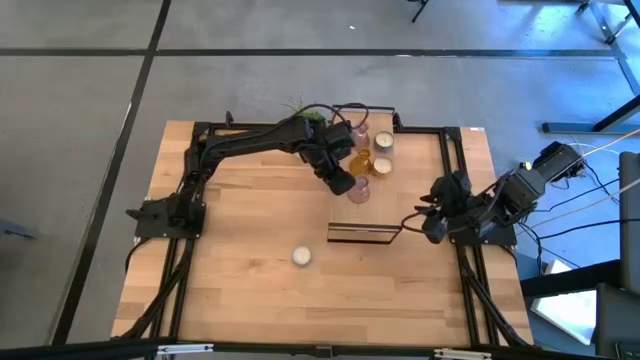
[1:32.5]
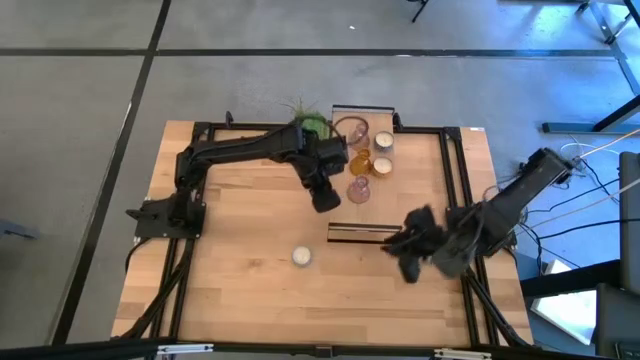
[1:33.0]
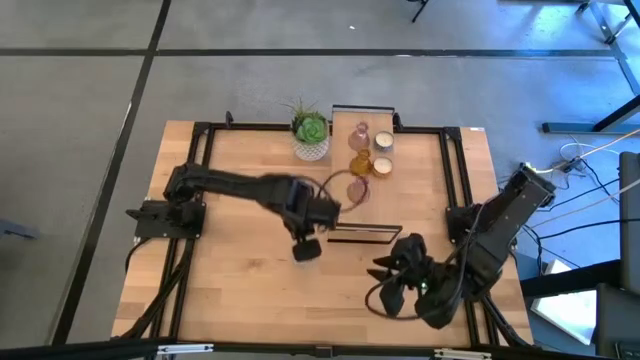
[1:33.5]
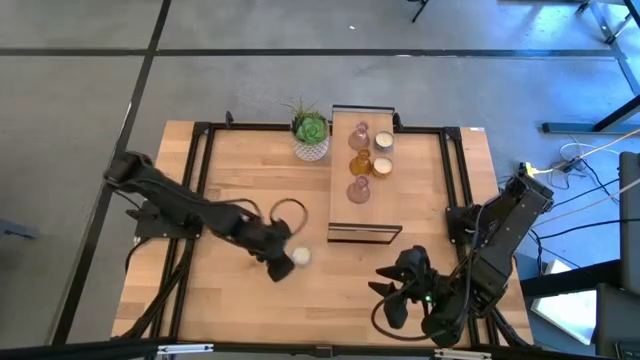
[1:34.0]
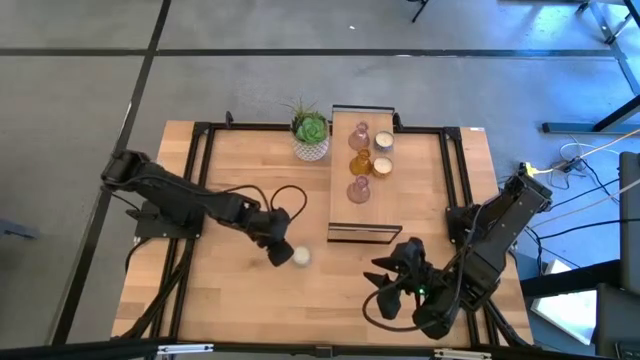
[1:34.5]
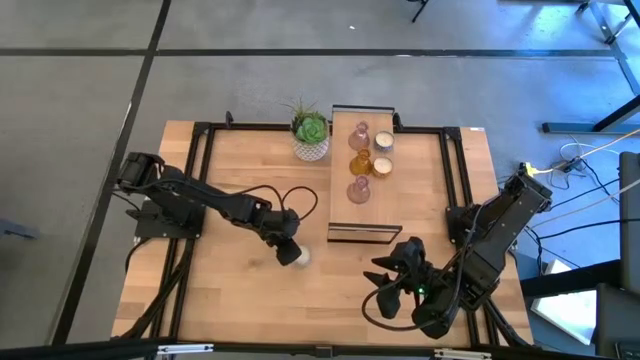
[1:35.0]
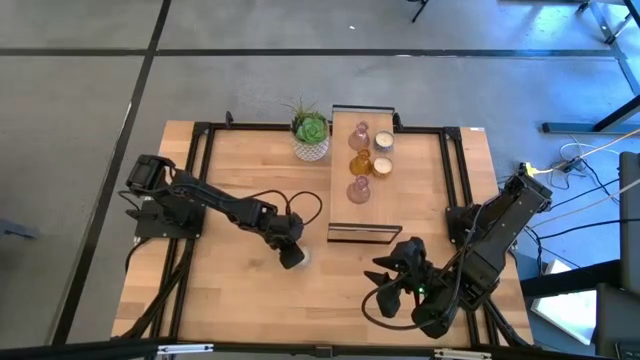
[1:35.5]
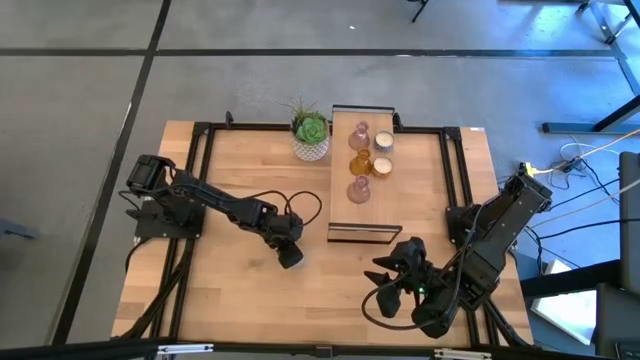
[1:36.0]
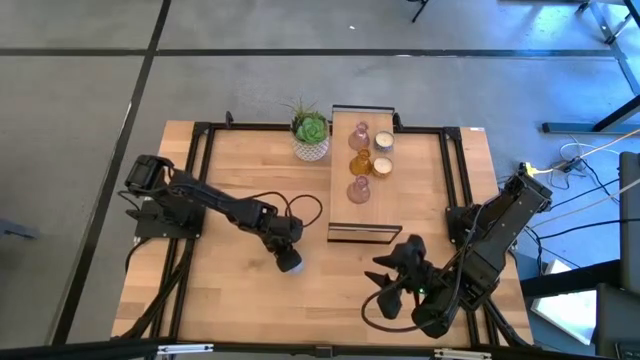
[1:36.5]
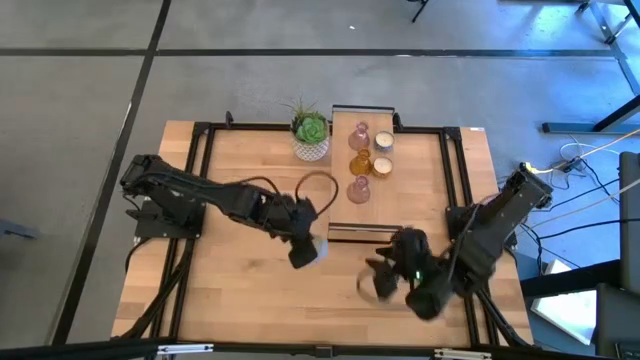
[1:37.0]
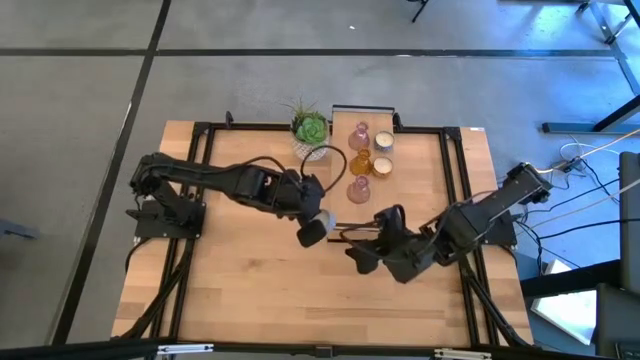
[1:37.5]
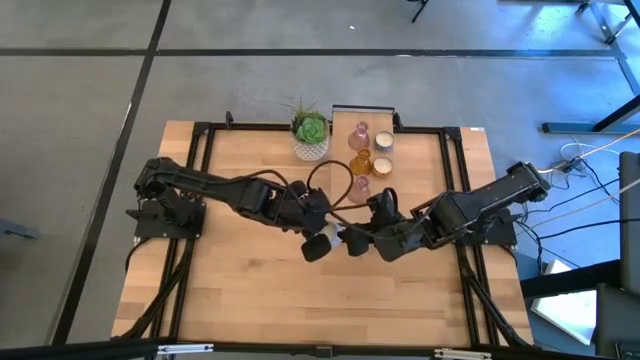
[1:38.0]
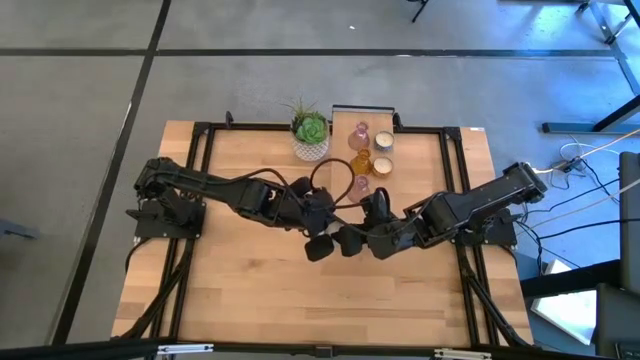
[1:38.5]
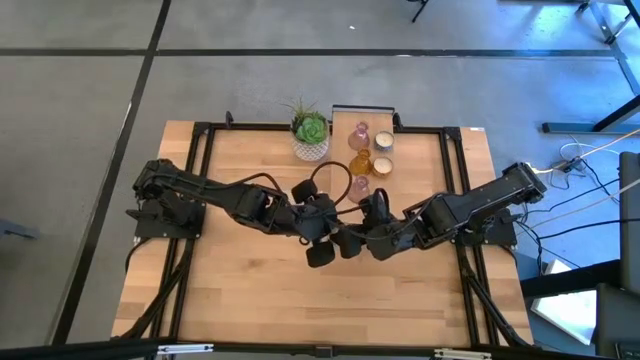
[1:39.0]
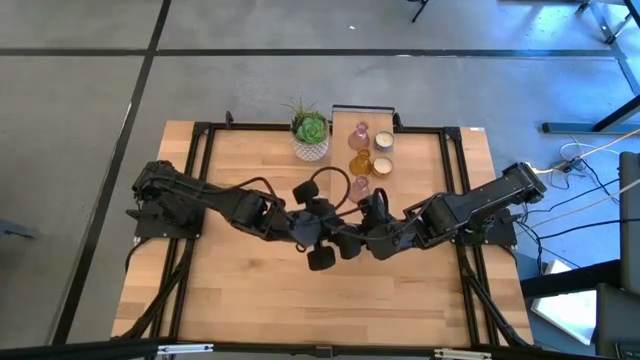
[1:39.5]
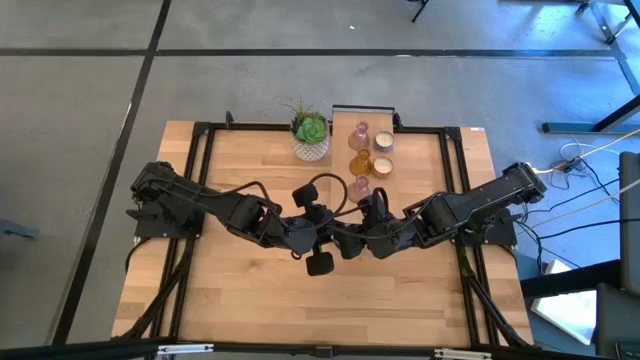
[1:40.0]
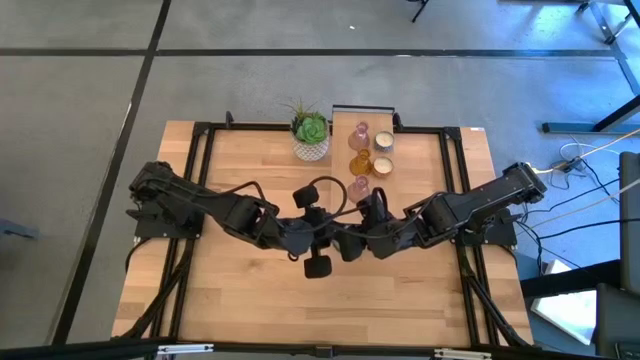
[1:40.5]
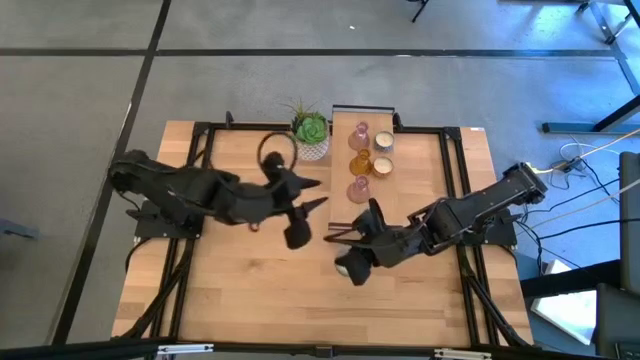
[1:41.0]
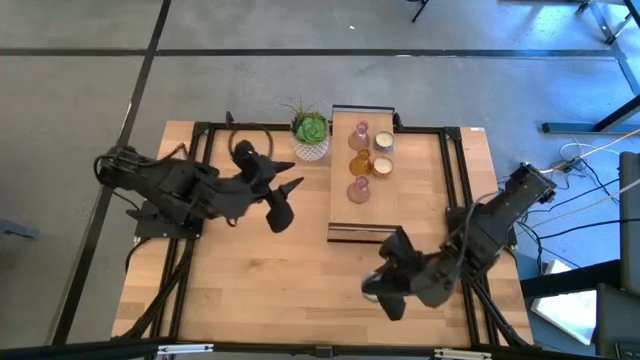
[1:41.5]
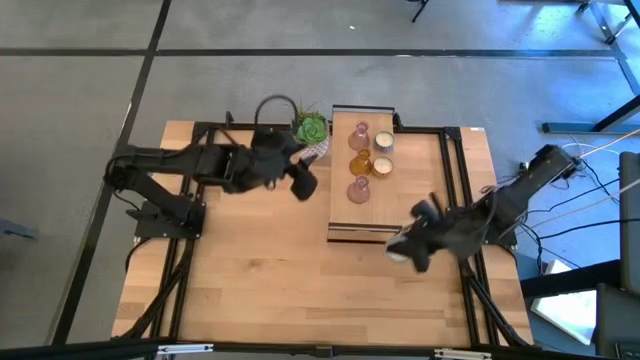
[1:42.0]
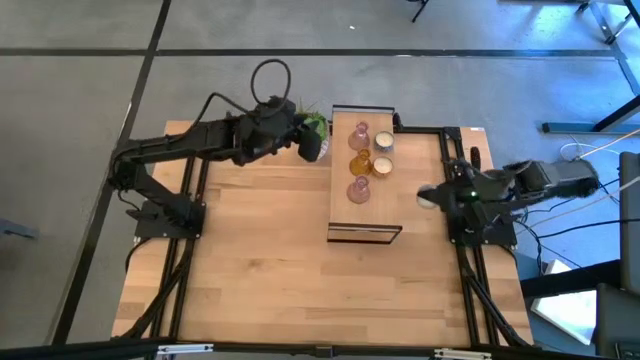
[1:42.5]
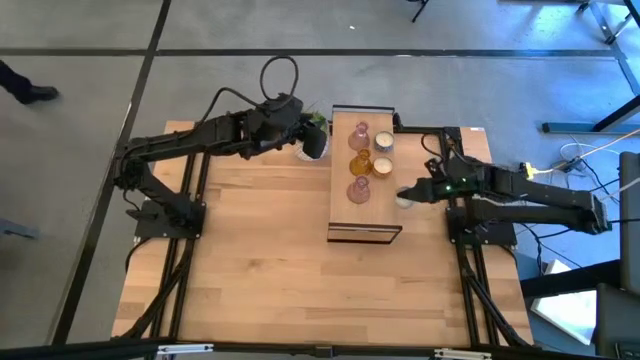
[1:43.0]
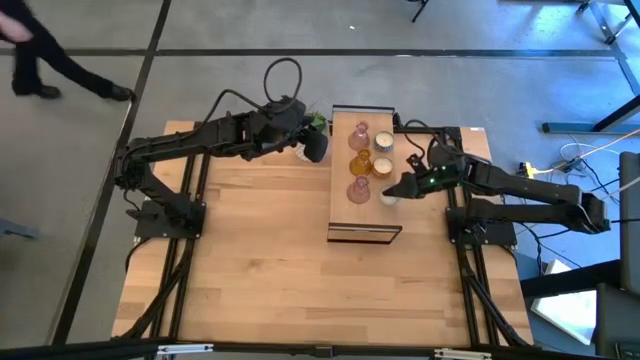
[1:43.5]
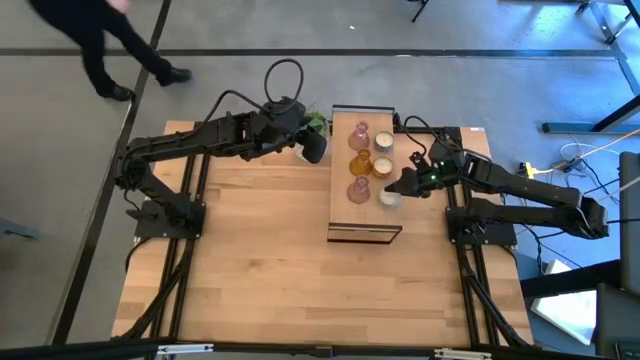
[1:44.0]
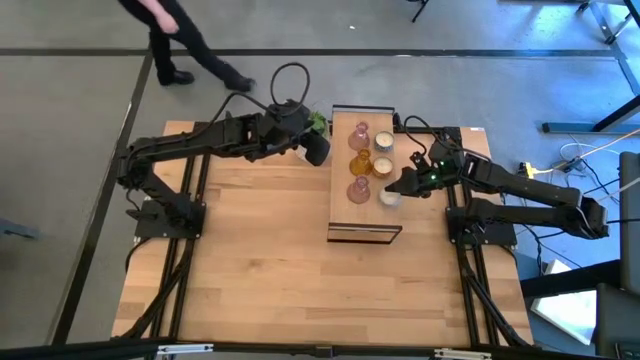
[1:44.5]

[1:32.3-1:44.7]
Task: Pick & Place candle stick holders
Put the patterned blue scented candle on the shelf aligned with the patterned orange scented candle

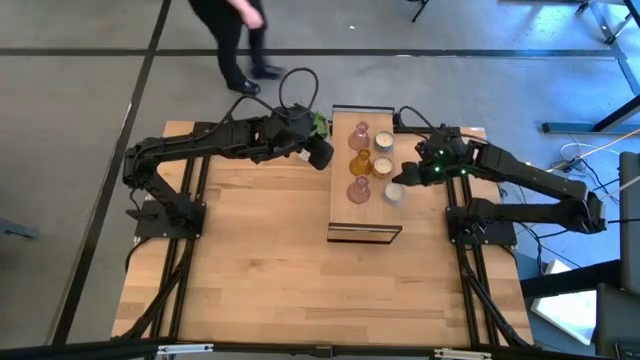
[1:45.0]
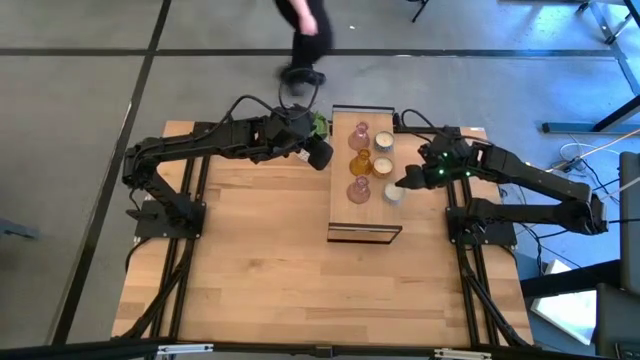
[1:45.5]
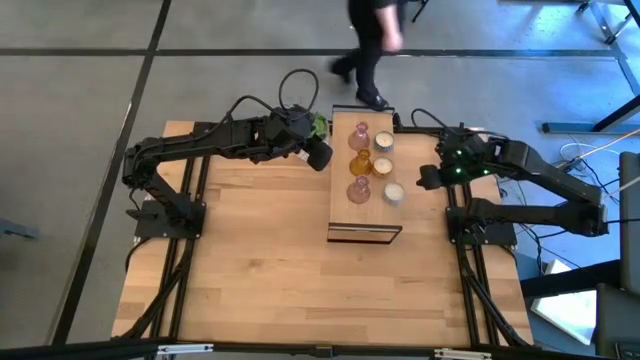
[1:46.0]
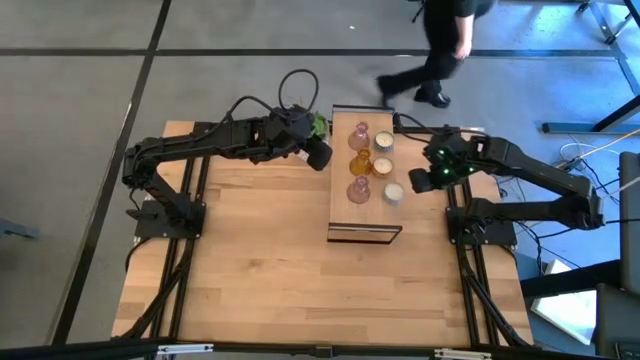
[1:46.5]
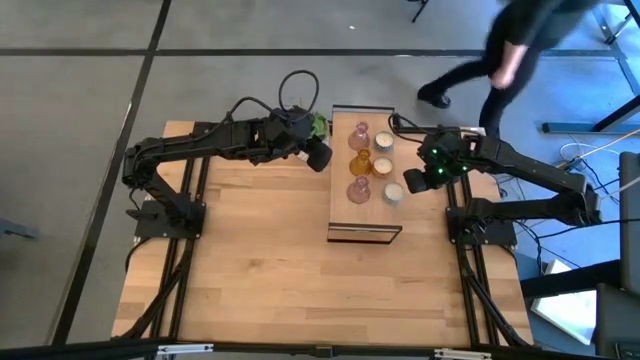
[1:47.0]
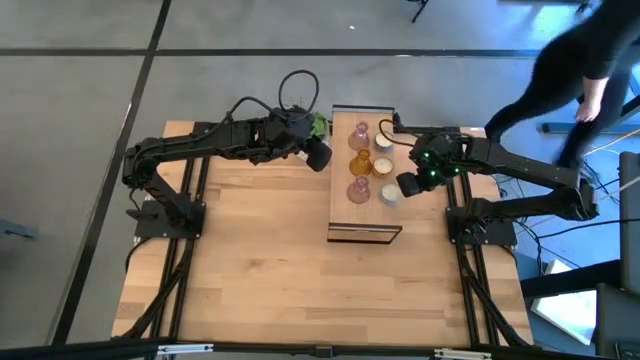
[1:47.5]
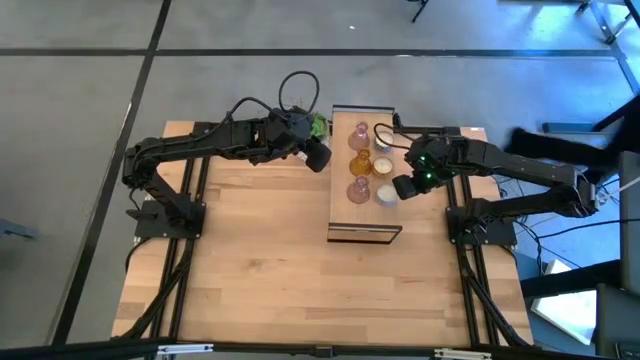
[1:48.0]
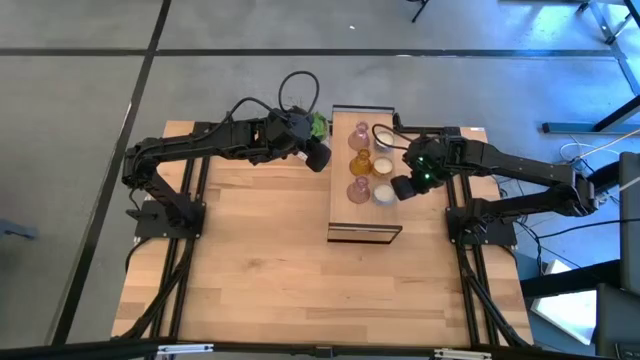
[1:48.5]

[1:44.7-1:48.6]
Adjust the patterned blue scented candle on the shelf

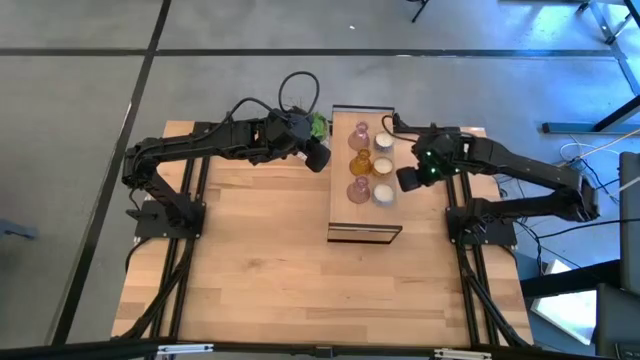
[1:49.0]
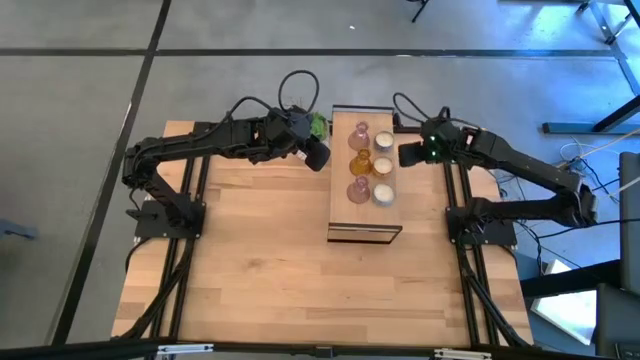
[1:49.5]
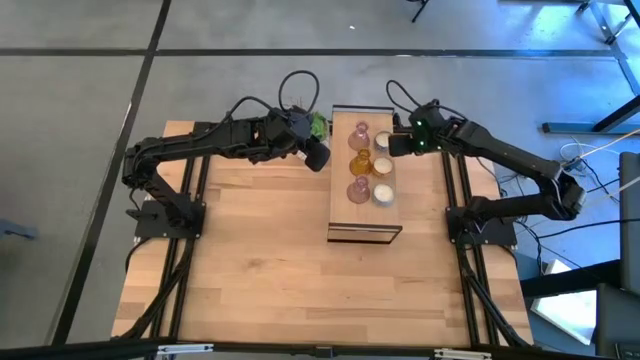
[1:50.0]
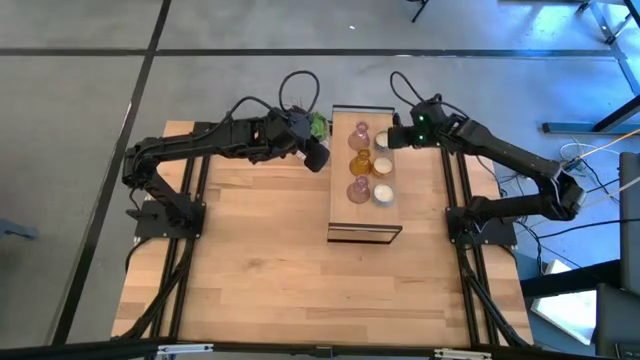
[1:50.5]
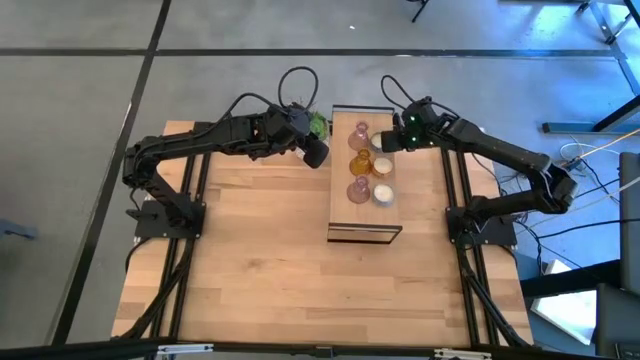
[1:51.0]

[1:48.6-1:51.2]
Adjust the patterned blue scented candle on the shelf

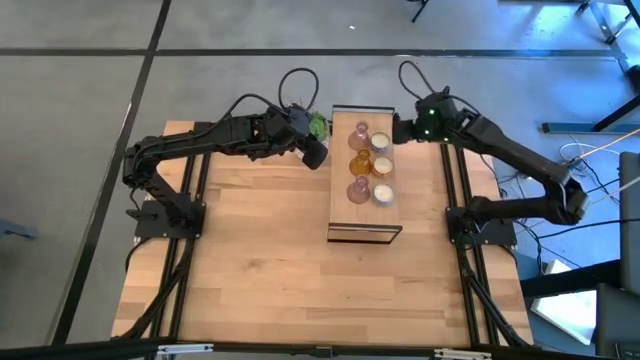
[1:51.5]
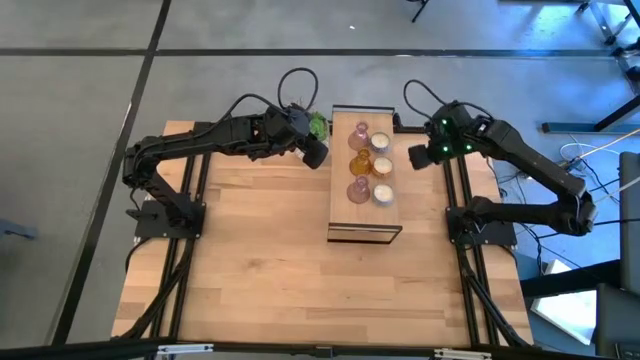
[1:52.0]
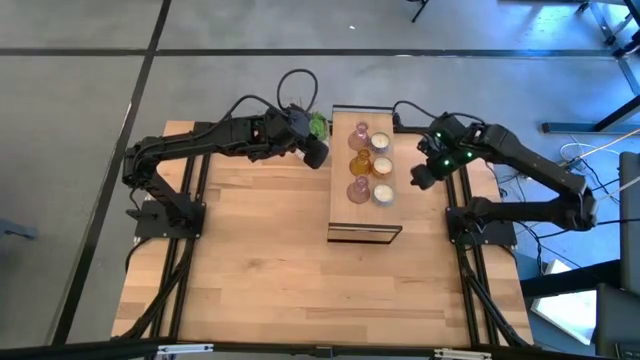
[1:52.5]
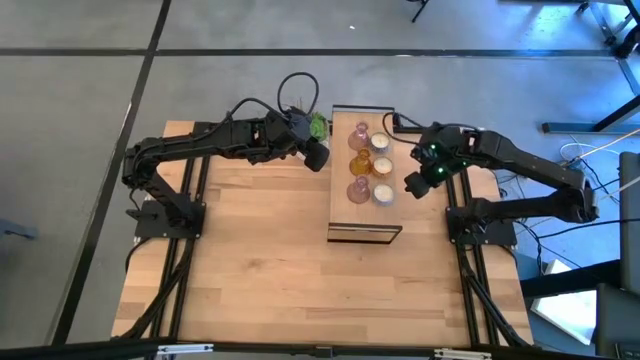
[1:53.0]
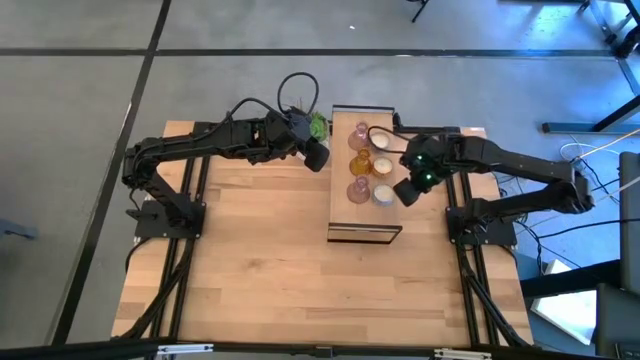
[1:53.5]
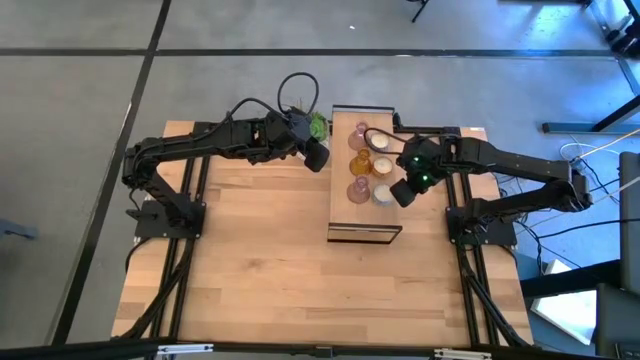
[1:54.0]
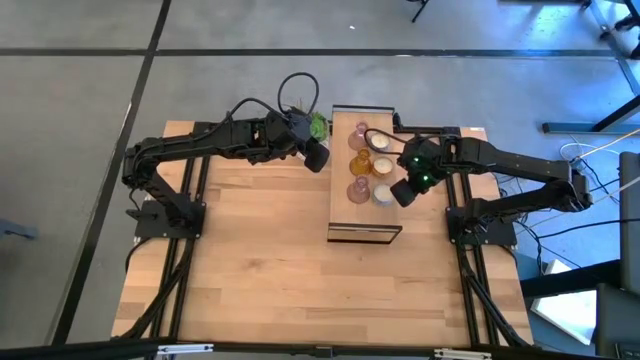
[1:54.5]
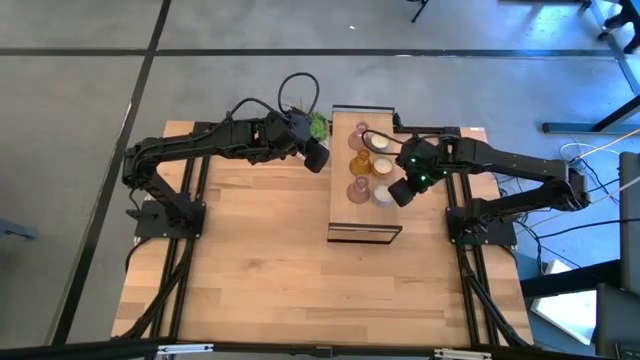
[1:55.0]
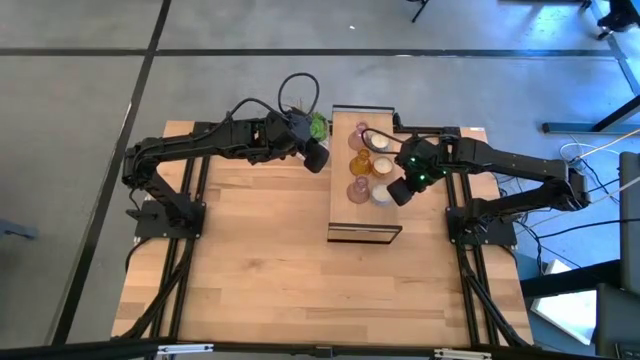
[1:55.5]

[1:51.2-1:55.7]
Adjust the patterned blue scented candle on the shelf
